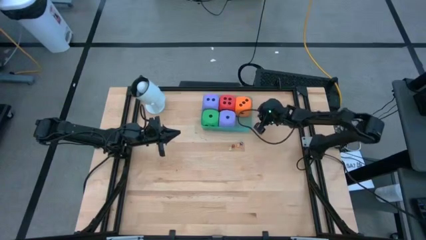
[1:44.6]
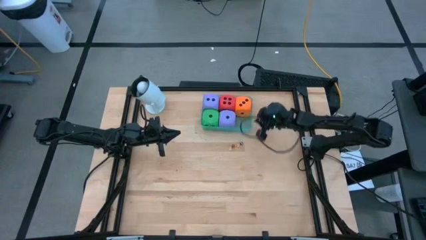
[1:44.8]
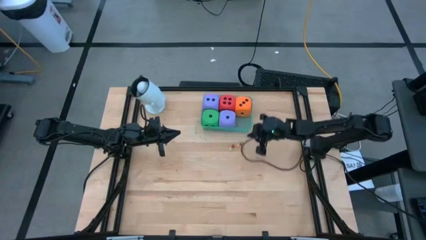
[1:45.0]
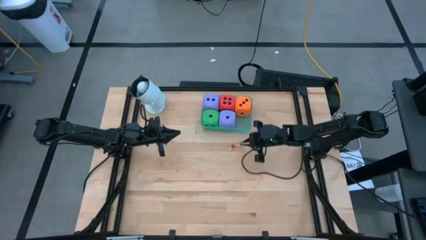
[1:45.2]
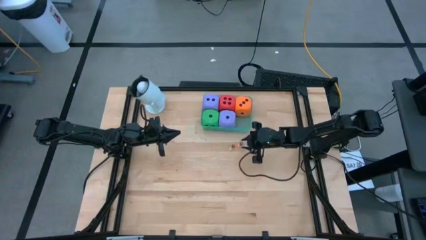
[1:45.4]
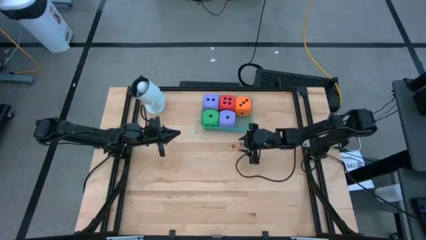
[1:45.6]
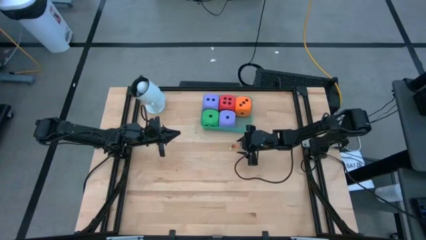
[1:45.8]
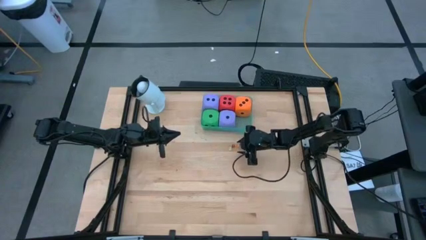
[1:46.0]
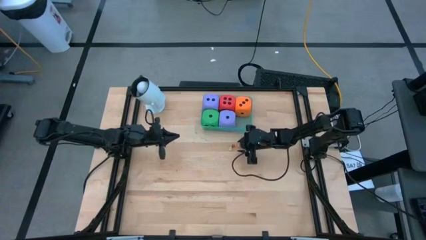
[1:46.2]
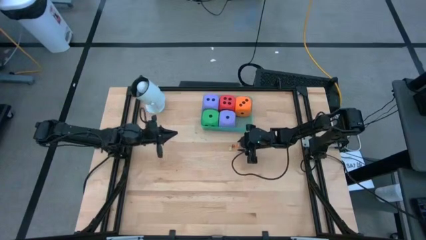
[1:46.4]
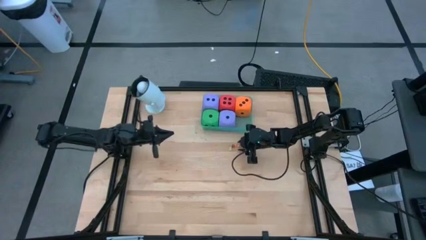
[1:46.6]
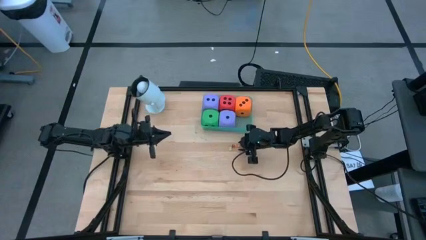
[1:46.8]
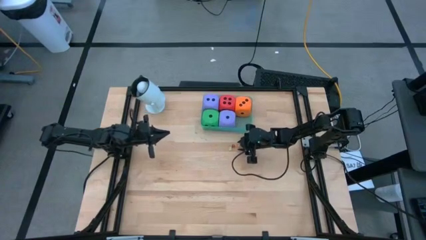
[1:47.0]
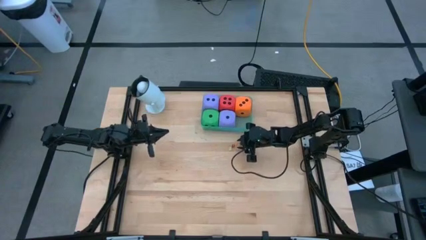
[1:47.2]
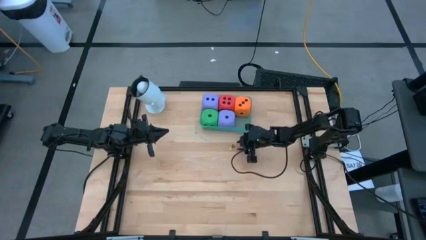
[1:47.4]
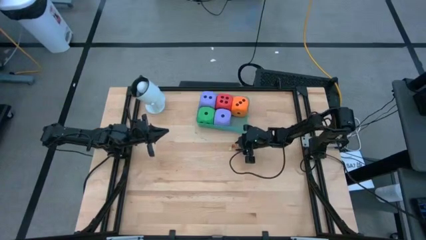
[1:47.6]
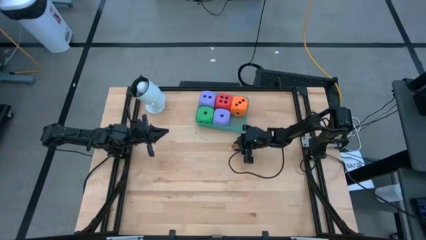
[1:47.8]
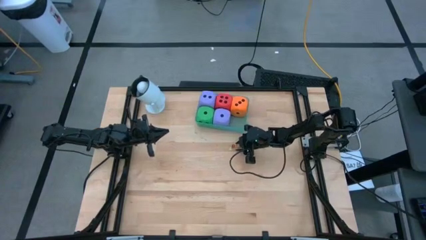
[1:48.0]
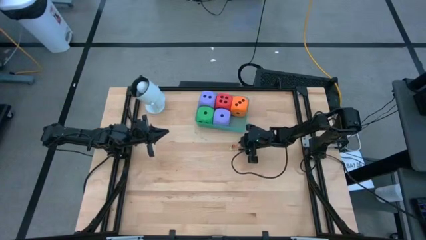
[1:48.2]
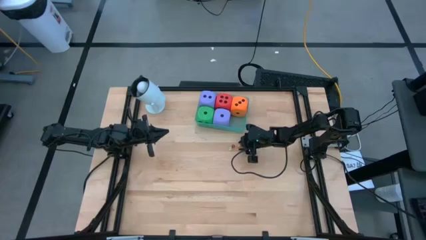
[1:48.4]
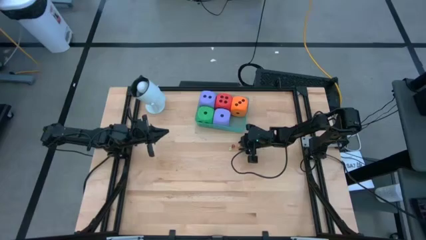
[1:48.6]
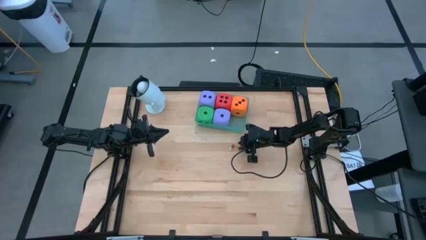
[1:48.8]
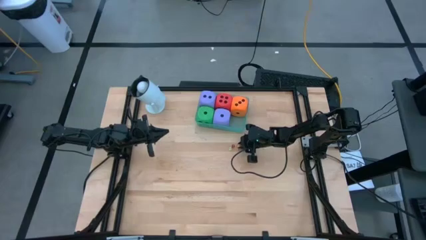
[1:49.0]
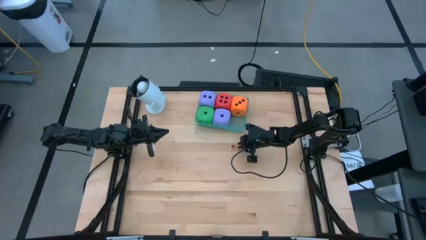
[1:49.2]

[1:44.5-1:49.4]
Task: Pick & Place Dice
Put the small orange dice into the transparent blue bin

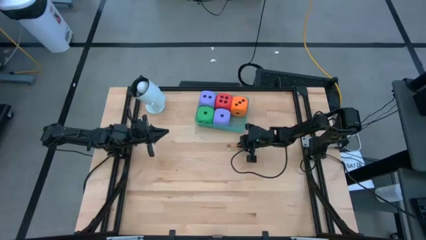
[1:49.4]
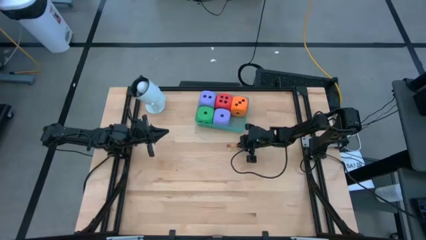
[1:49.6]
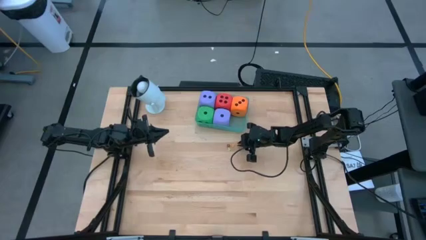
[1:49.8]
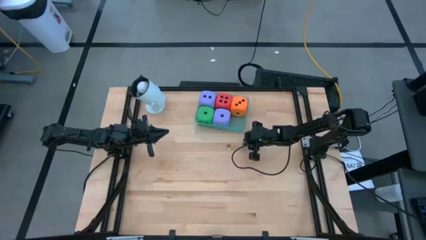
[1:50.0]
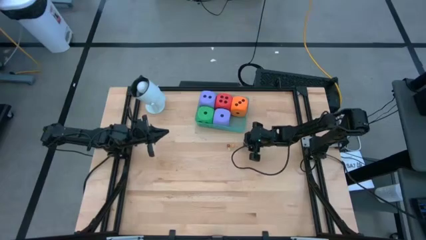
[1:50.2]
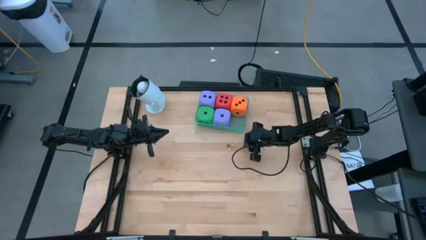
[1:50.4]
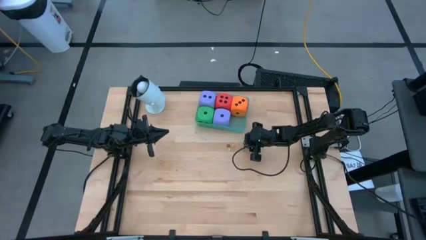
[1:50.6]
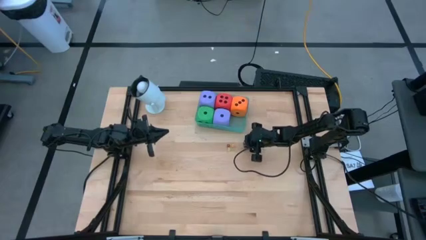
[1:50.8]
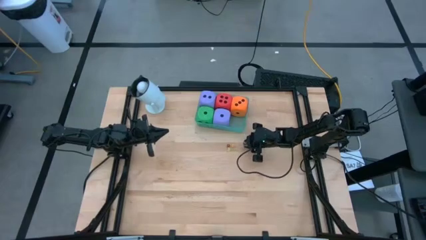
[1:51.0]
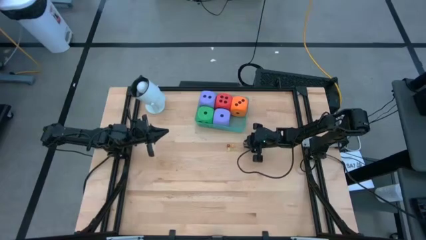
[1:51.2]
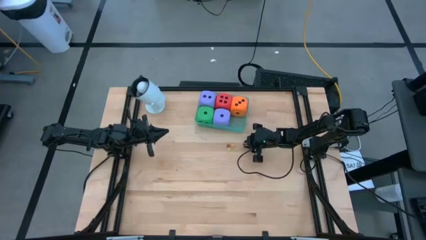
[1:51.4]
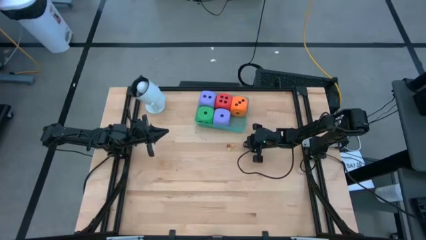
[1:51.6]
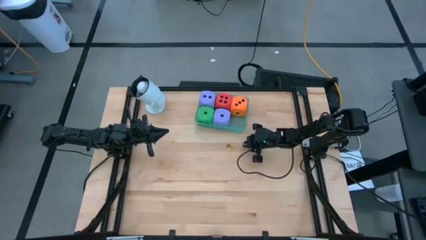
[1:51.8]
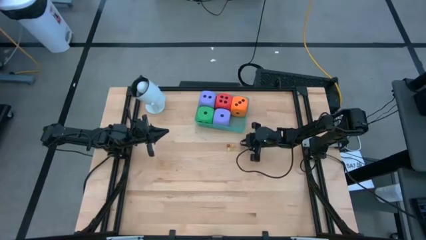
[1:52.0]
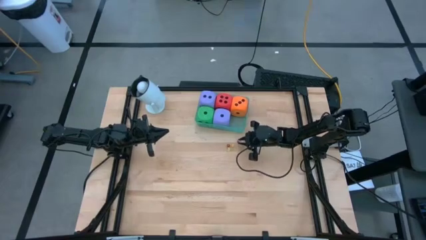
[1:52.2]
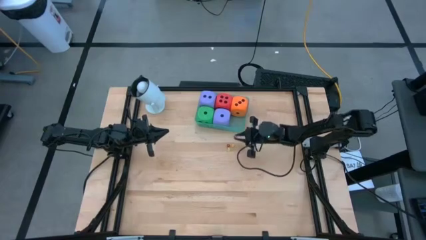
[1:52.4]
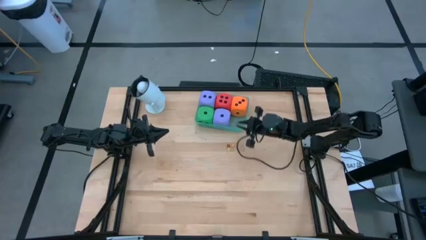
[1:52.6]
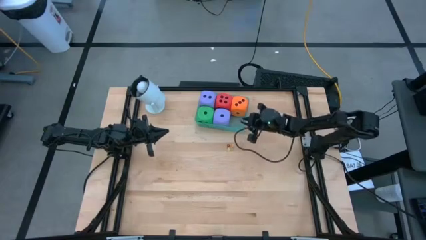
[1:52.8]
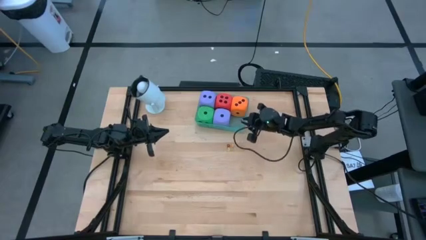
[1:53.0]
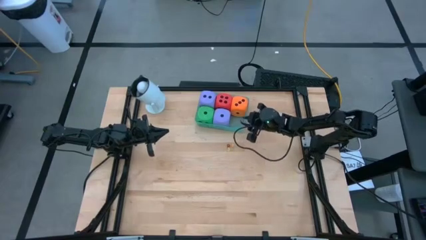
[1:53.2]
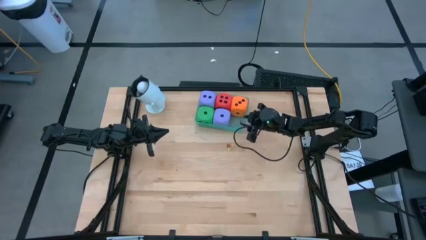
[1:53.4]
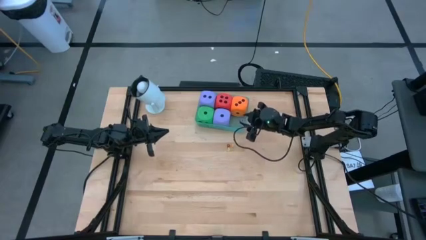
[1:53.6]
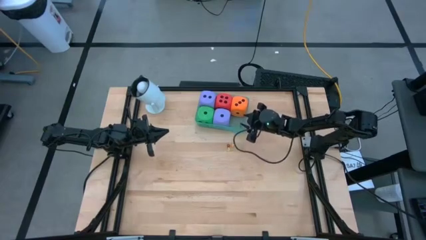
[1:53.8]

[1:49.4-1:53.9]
Put the small violet dice into the transparent blue bin

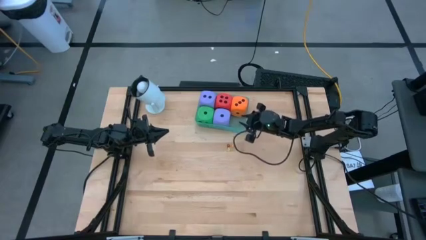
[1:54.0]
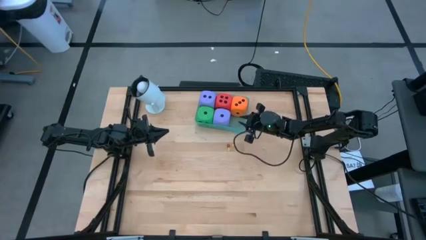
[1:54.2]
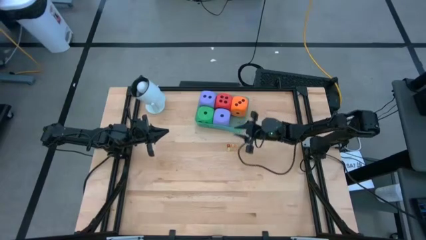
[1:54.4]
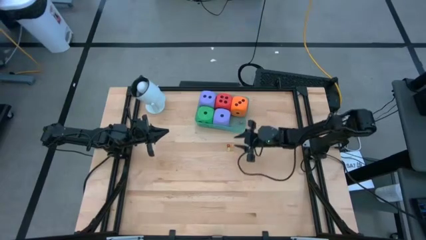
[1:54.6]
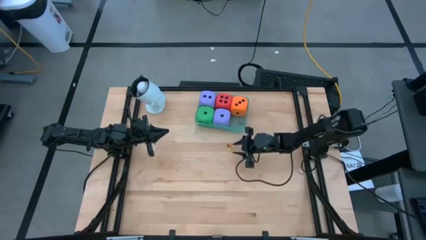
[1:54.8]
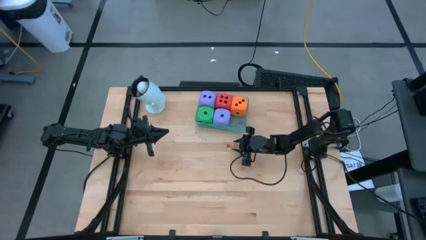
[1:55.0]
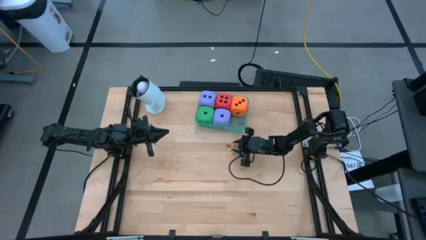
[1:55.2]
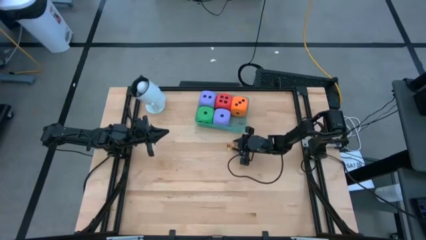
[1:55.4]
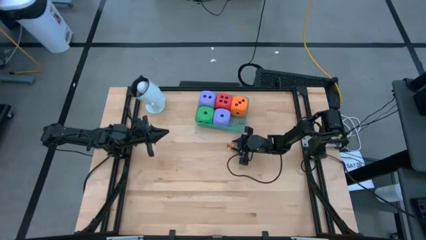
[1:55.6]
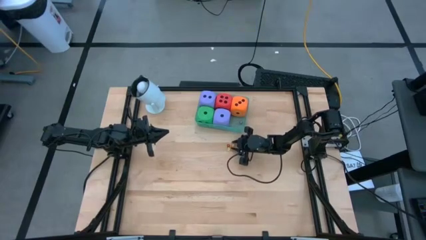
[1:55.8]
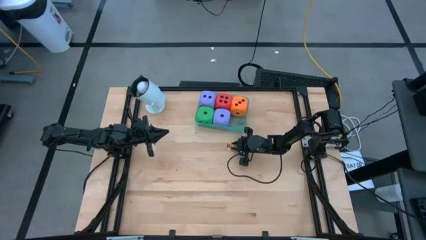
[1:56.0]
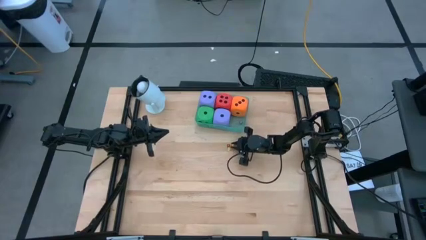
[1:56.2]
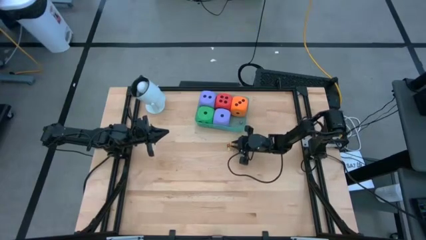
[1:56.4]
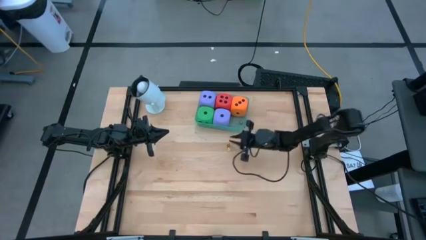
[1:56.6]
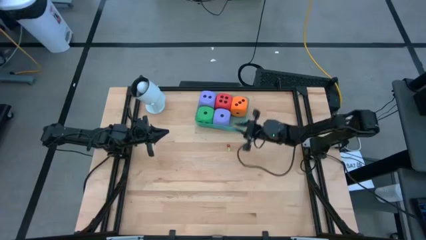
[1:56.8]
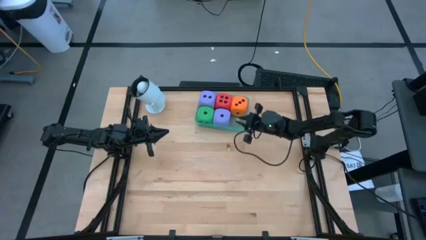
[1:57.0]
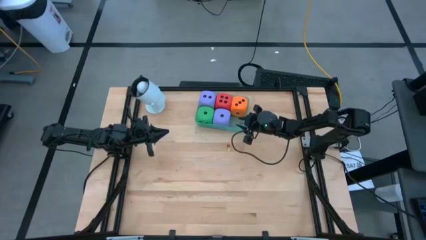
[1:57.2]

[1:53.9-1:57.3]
Put the small orange dice into the transparent blue bin
